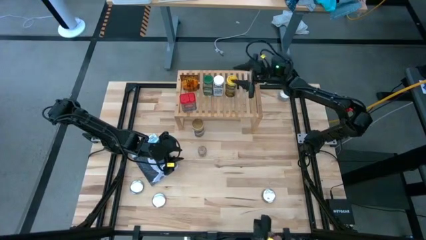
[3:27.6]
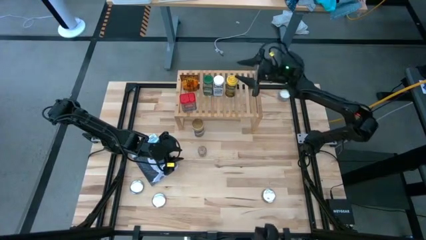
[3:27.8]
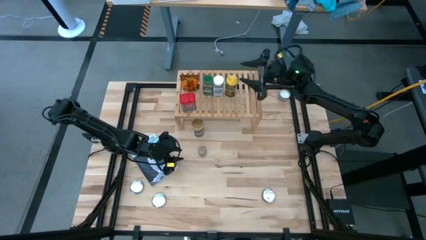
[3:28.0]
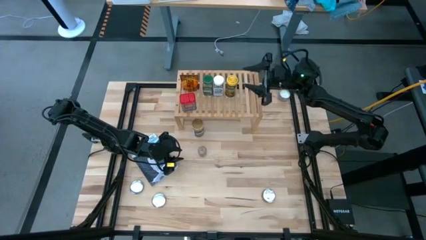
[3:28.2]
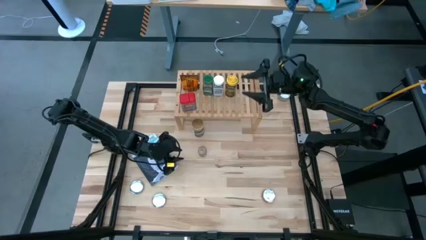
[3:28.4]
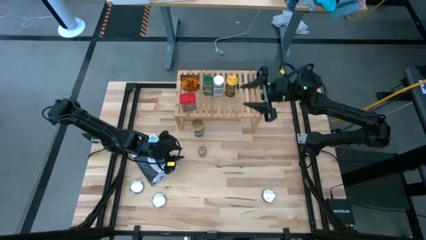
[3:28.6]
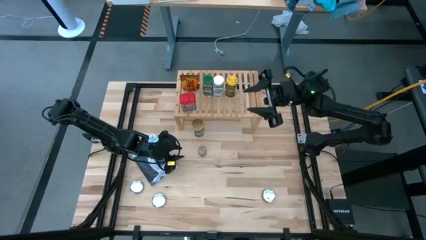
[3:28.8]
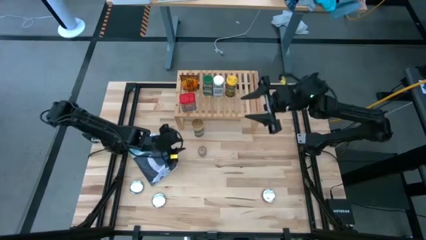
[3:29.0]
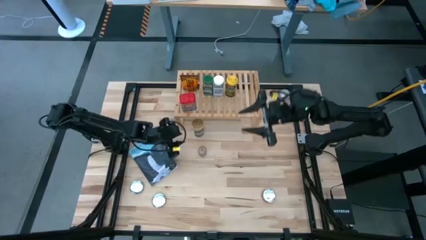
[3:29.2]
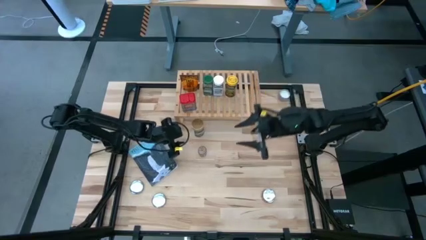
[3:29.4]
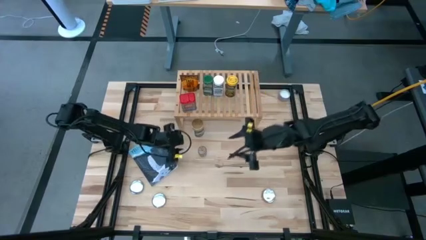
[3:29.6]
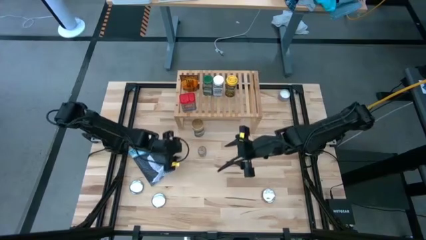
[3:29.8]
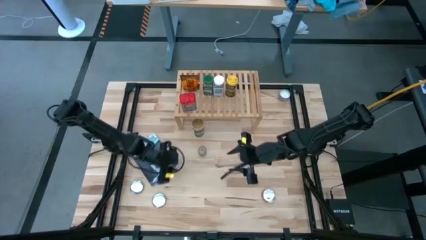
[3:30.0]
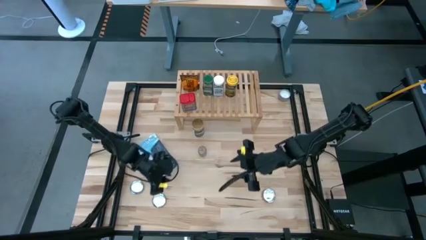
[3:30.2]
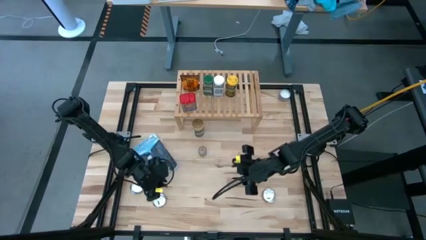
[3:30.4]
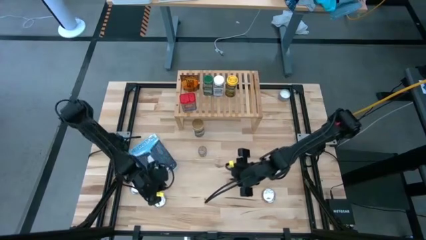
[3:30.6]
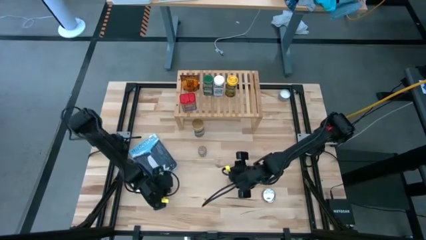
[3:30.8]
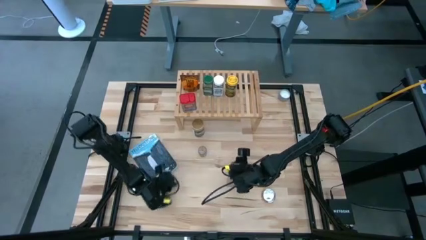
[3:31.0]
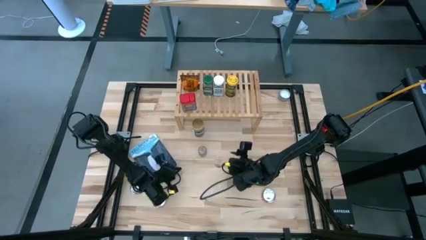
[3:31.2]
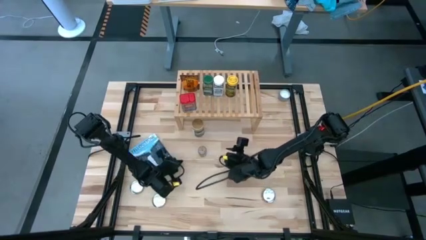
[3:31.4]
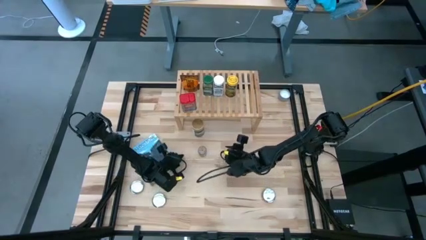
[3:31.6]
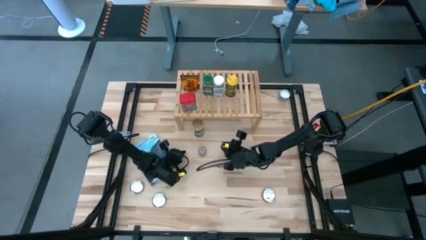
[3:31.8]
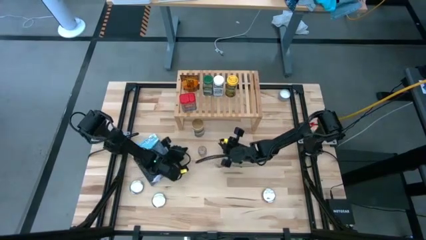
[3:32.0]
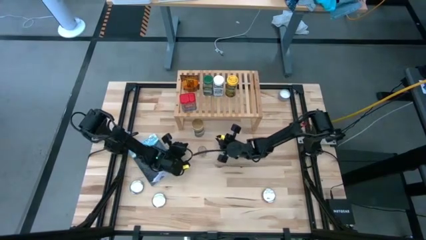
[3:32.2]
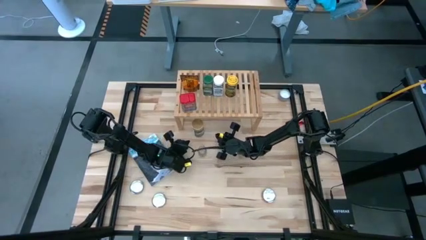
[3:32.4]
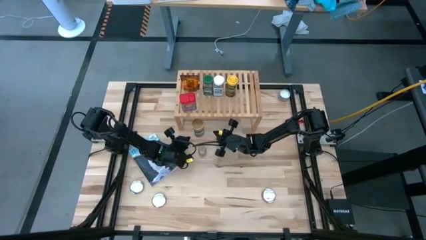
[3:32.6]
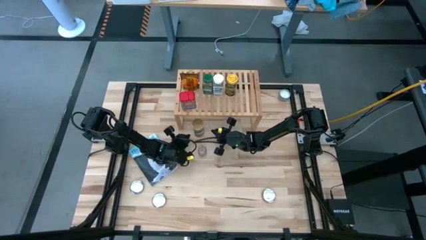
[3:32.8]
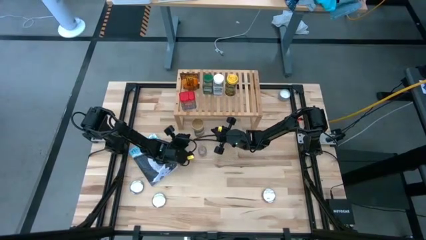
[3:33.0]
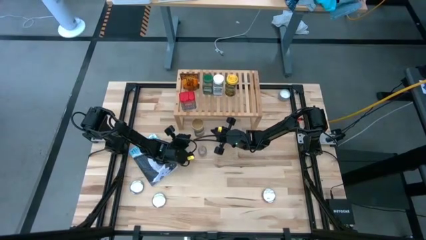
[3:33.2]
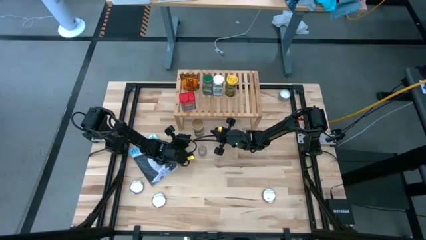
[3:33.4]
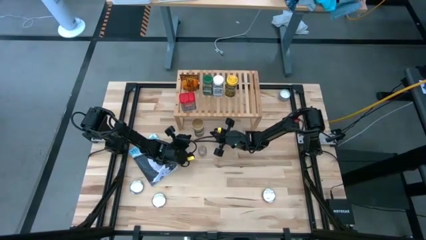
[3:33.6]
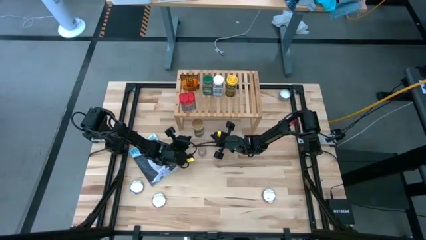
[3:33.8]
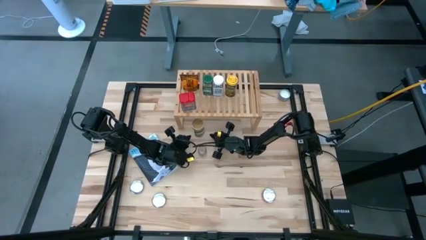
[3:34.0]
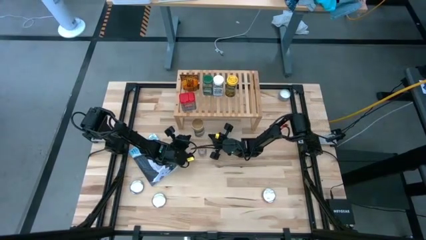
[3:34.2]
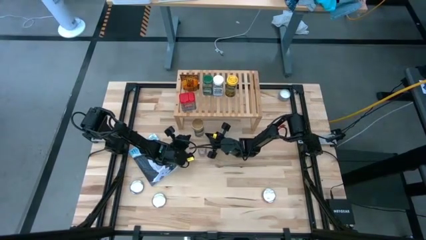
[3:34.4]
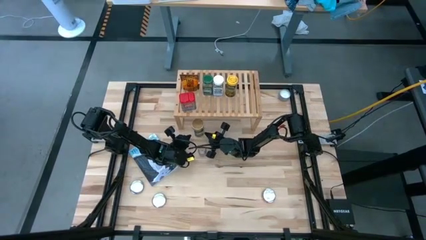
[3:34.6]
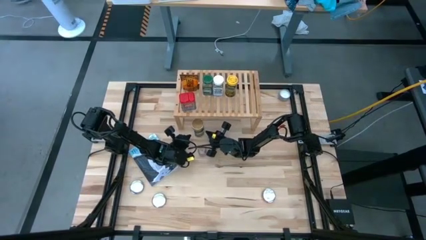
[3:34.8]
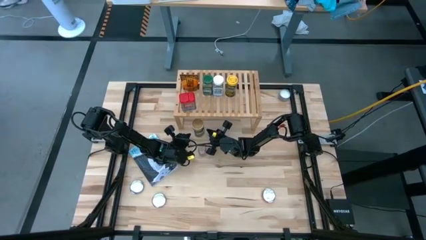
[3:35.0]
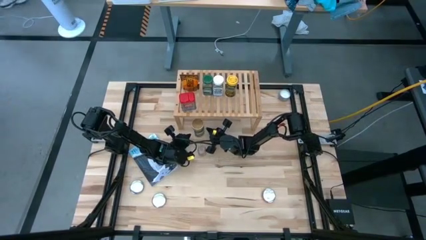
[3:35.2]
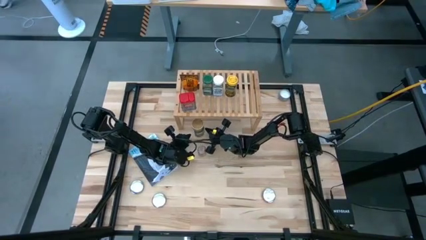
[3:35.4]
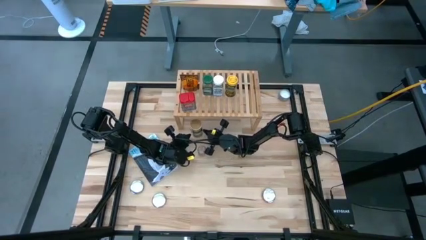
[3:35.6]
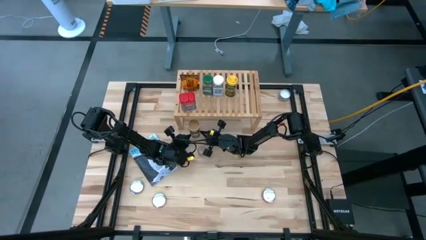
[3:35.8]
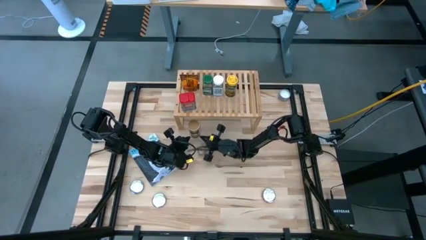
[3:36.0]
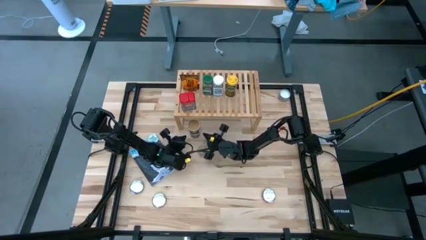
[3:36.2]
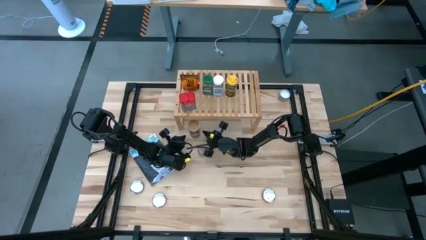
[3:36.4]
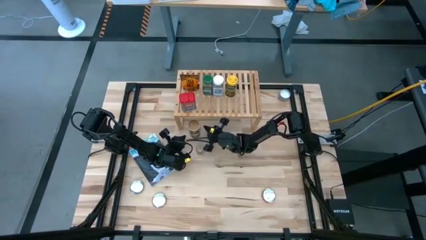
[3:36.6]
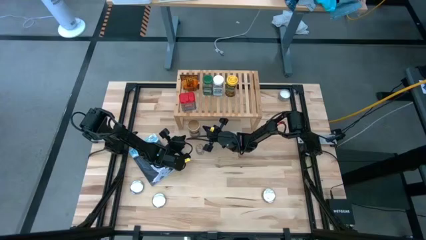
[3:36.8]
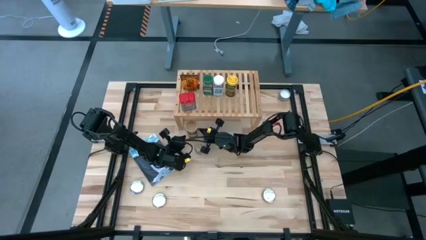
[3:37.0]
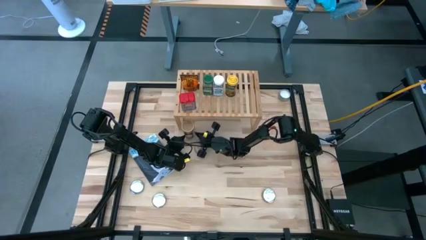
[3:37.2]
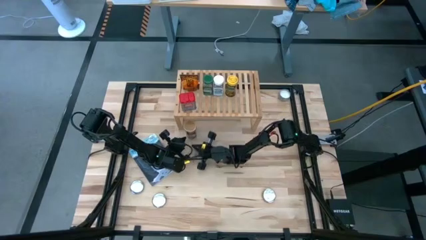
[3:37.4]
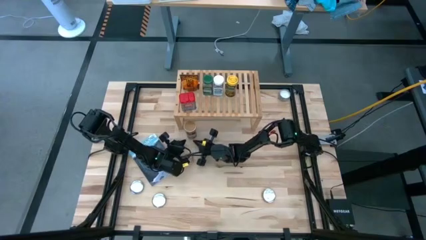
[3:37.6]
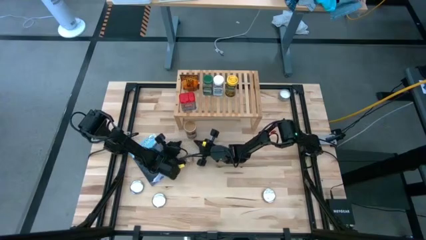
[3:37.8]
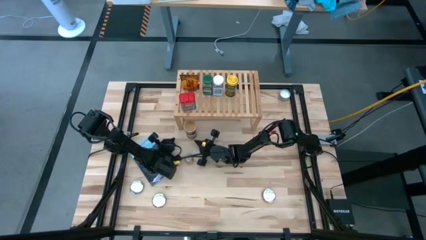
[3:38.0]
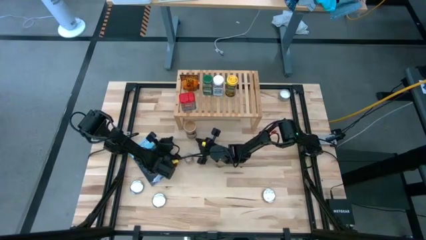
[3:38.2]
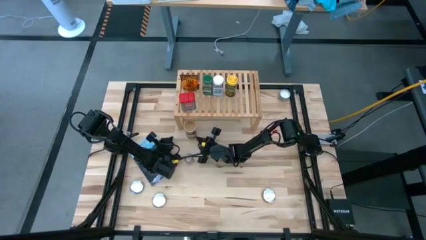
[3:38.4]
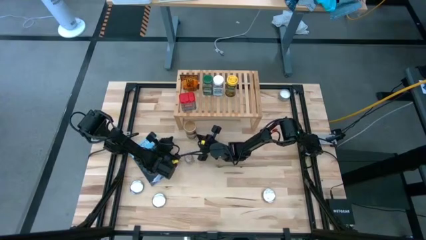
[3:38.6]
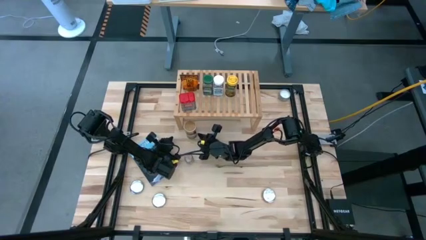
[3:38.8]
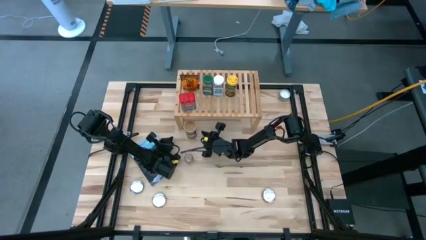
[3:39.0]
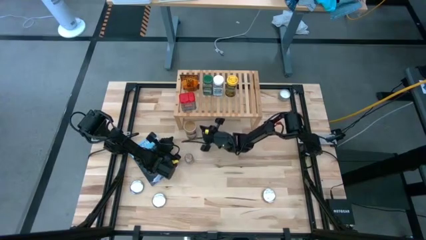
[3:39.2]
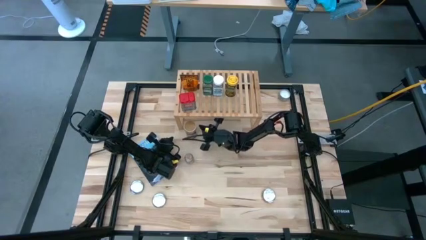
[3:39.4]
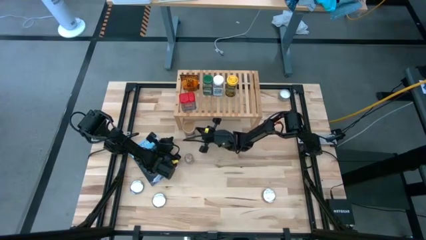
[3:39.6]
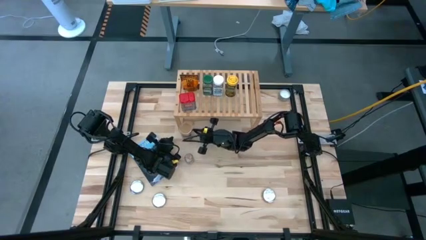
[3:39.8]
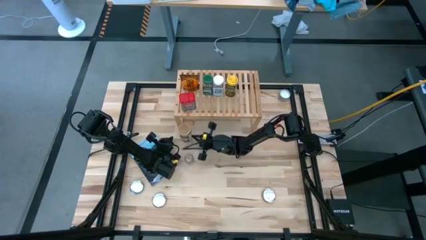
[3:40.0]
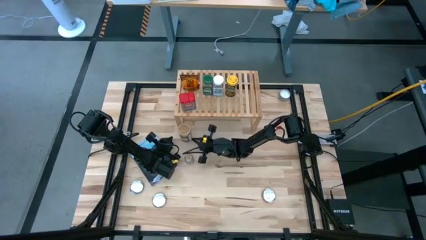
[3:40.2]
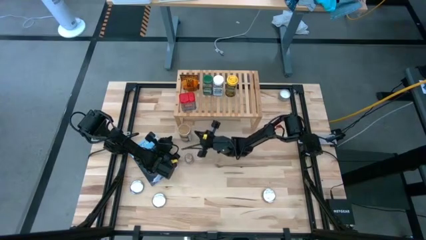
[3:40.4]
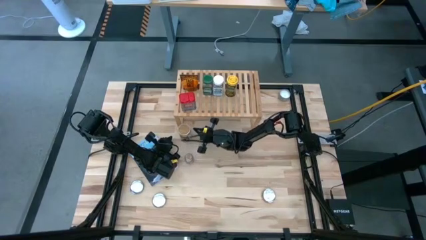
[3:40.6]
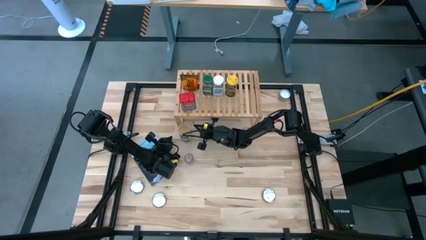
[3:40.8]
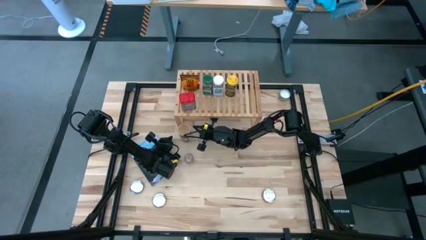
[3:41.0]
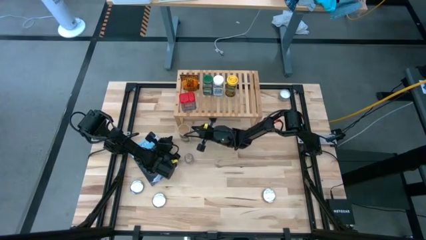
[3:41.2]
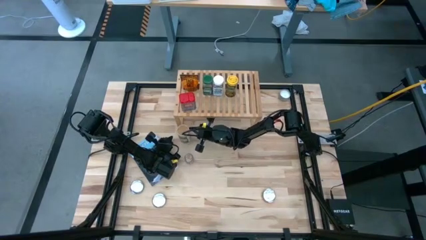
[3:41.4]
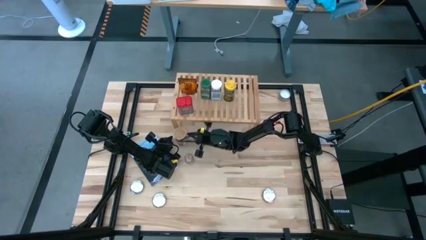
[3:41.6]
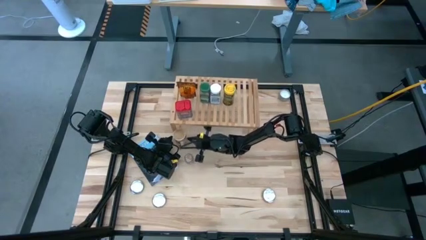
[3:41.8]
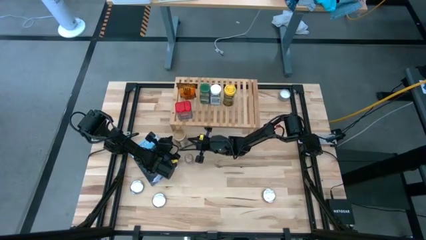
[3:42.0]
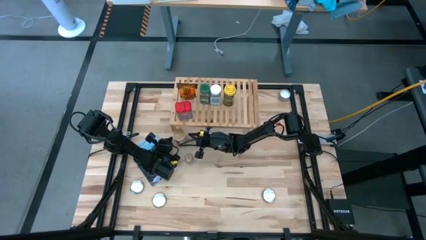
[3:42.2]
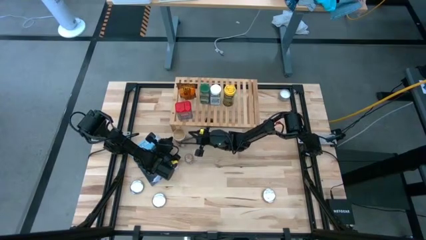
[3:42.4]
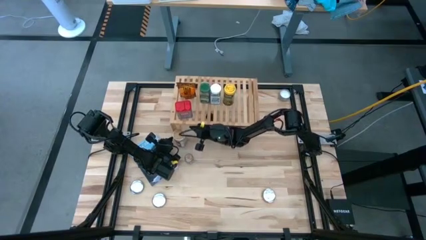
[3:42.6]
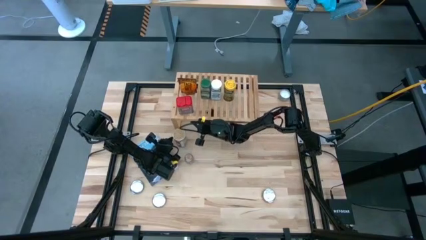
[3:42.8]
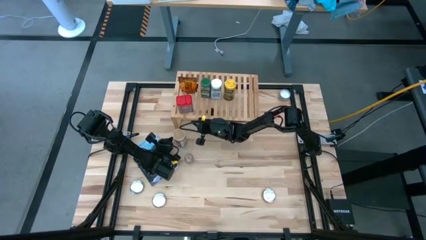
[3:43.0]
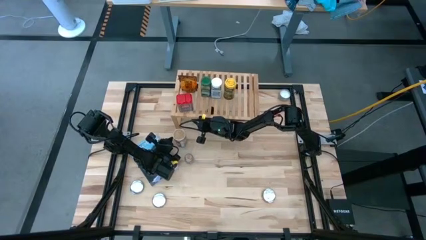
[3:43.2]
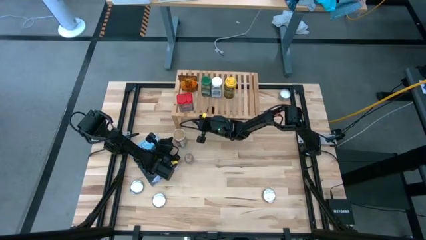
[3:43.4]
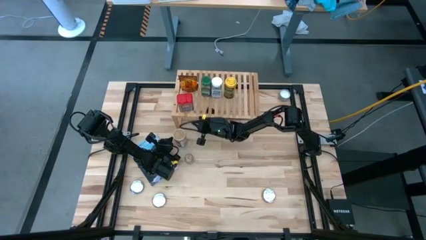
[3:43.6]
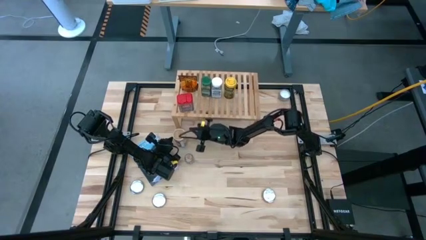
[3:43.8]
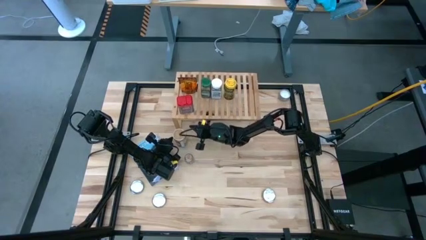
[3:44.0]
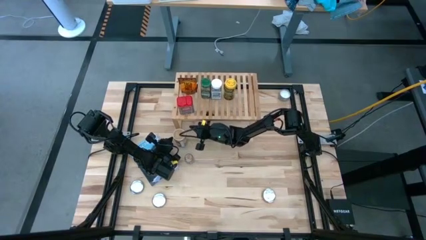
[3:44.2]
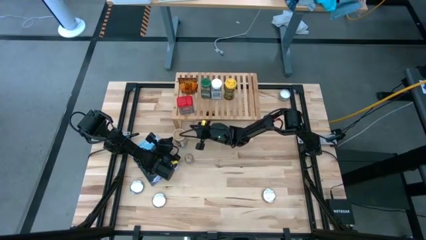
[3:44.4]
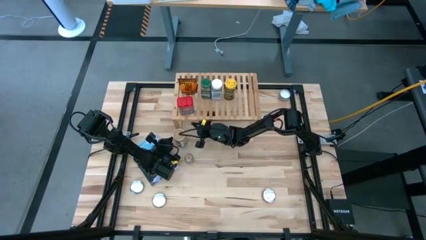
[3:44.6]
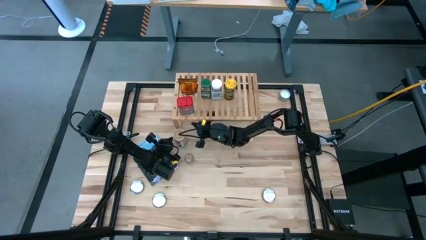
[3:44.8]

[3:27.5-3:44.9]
Task: Shelf spices
Put the brown seasoning bottle on the shelf
